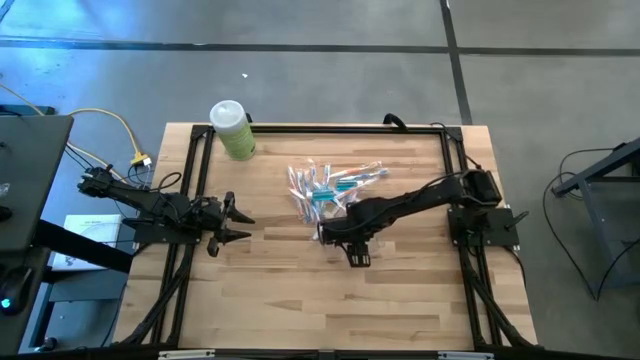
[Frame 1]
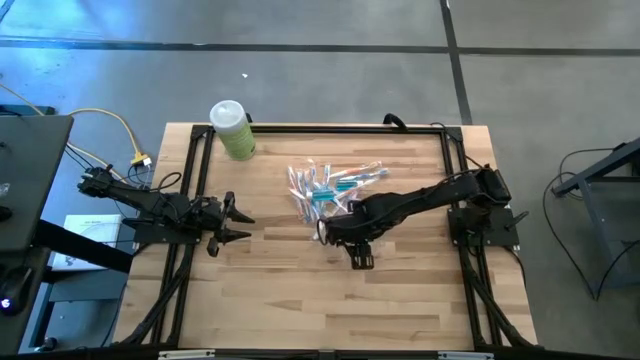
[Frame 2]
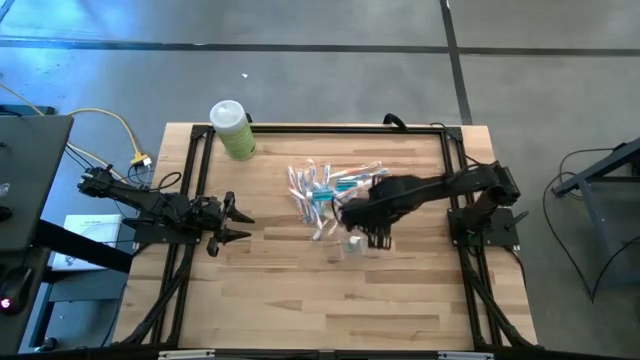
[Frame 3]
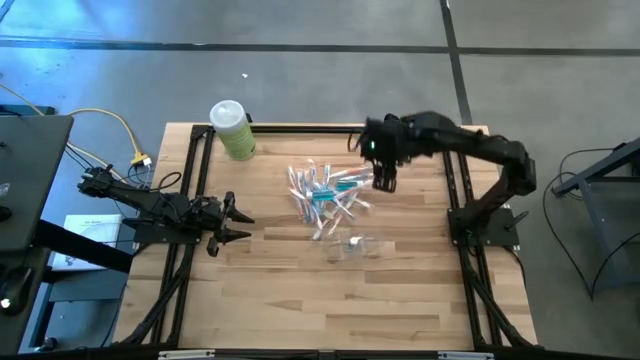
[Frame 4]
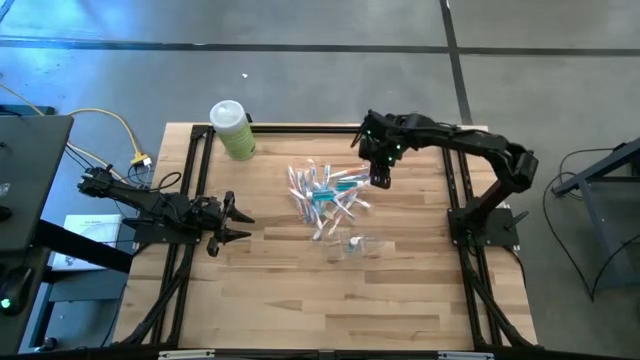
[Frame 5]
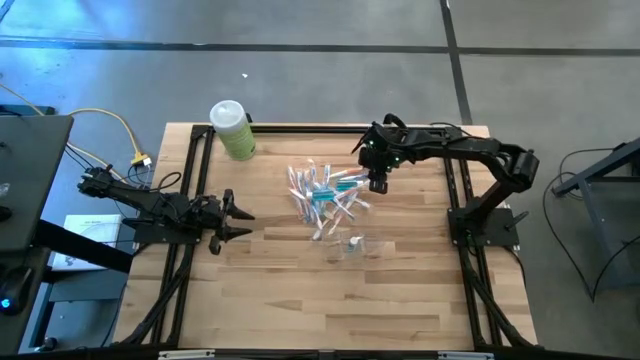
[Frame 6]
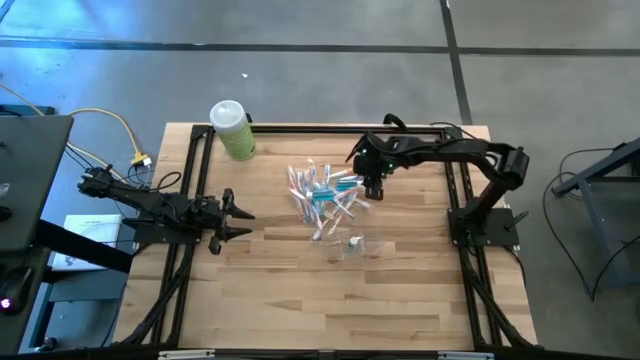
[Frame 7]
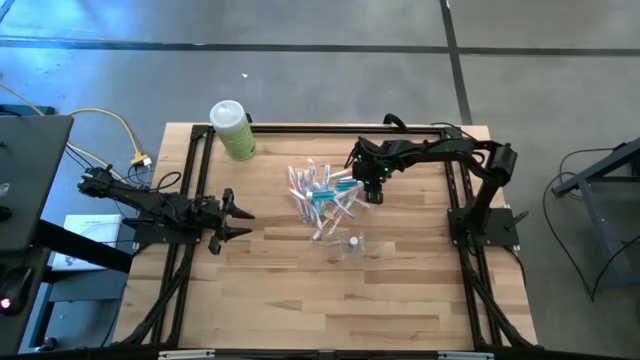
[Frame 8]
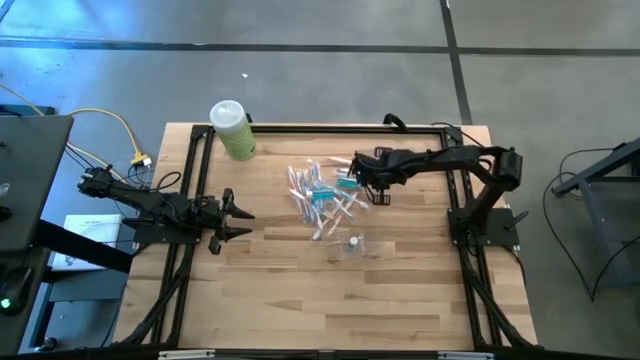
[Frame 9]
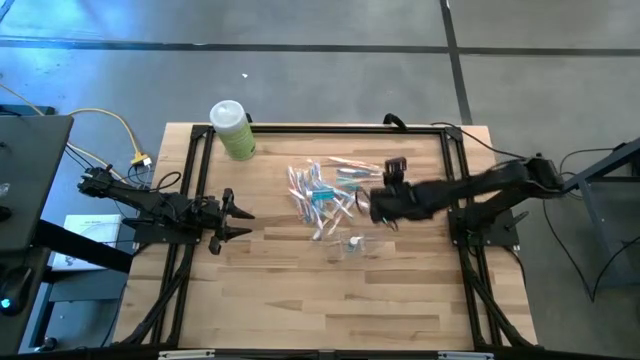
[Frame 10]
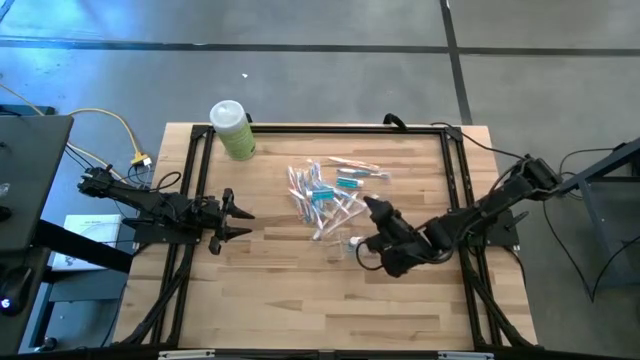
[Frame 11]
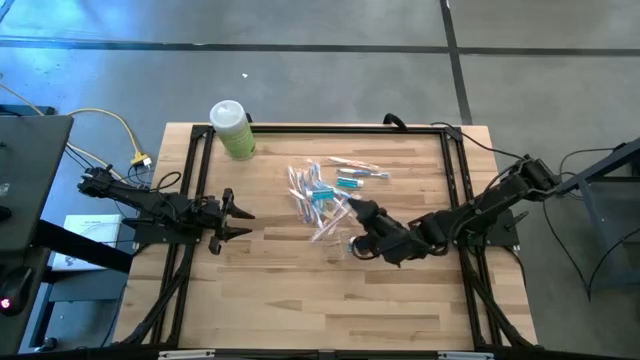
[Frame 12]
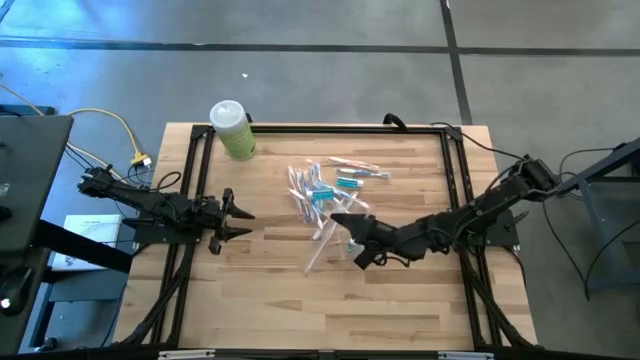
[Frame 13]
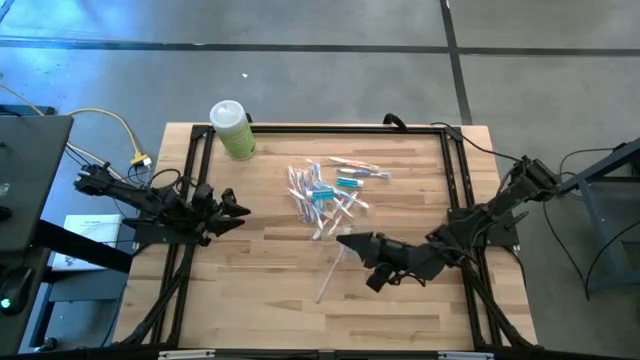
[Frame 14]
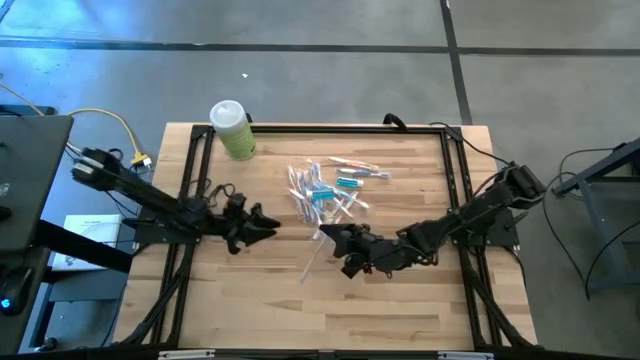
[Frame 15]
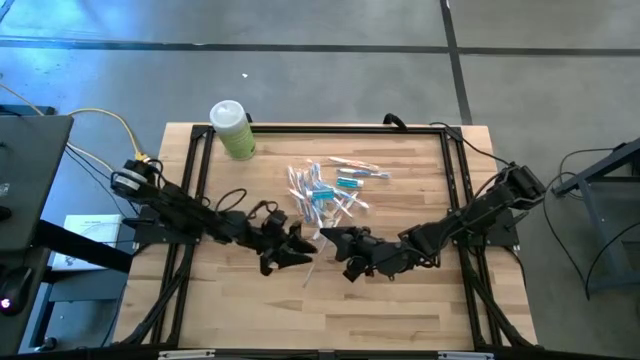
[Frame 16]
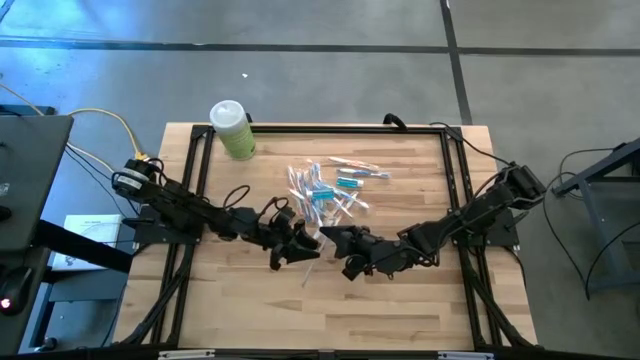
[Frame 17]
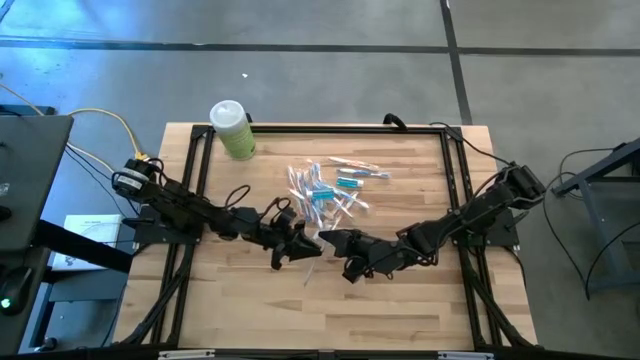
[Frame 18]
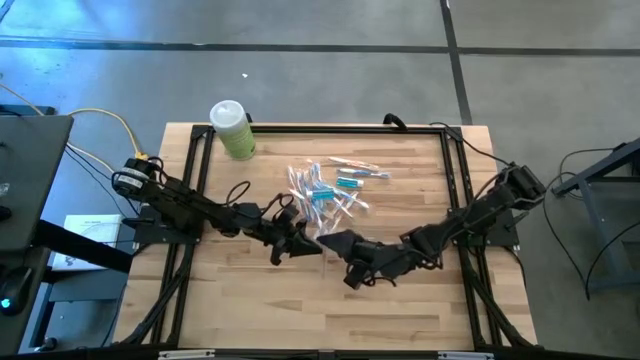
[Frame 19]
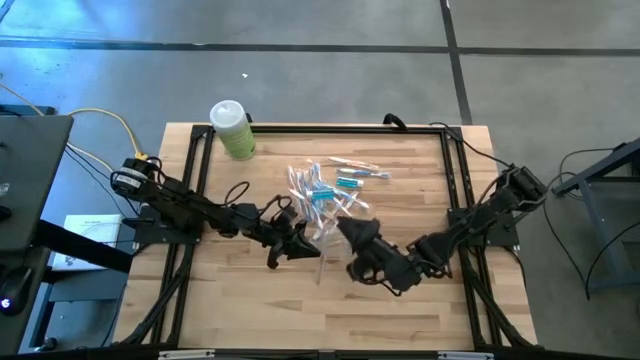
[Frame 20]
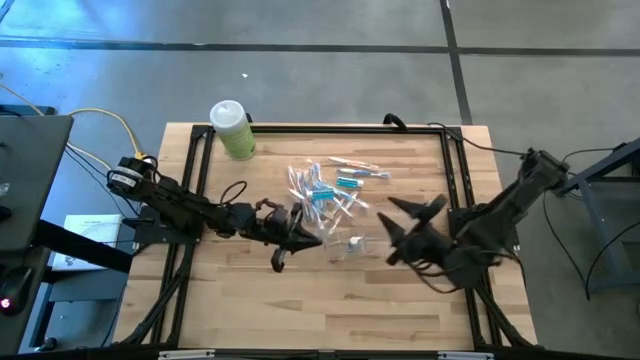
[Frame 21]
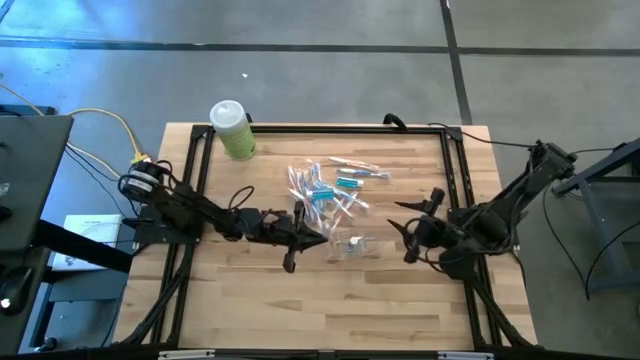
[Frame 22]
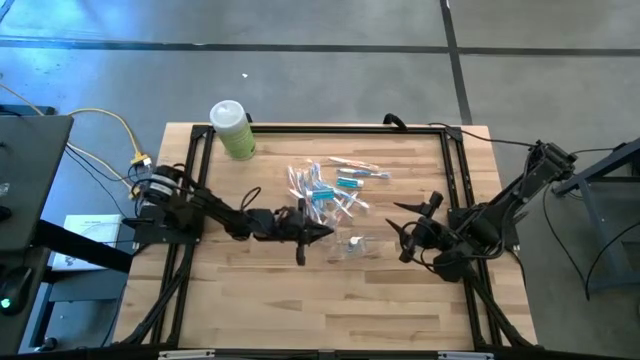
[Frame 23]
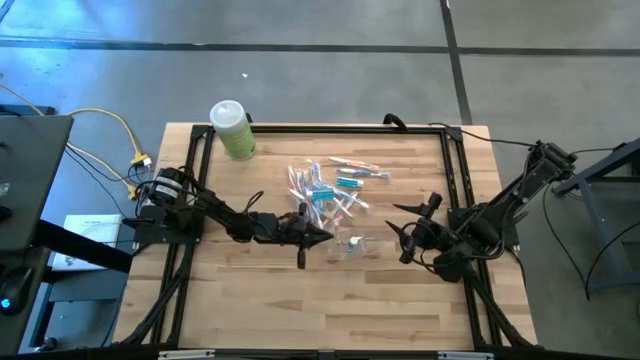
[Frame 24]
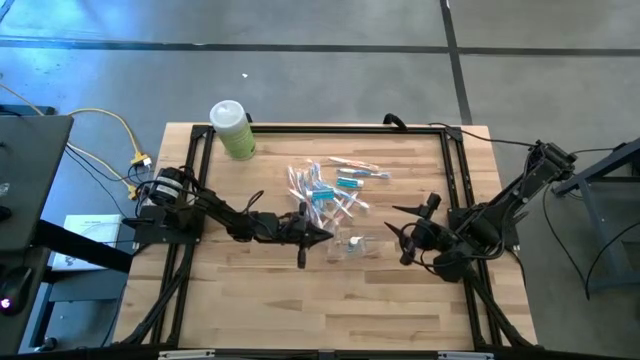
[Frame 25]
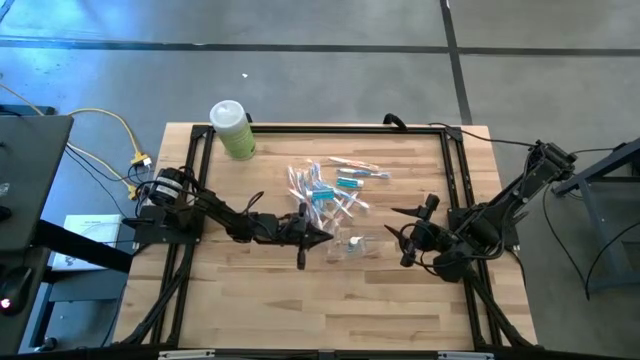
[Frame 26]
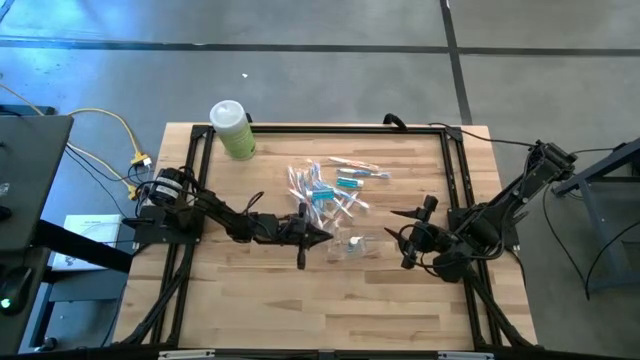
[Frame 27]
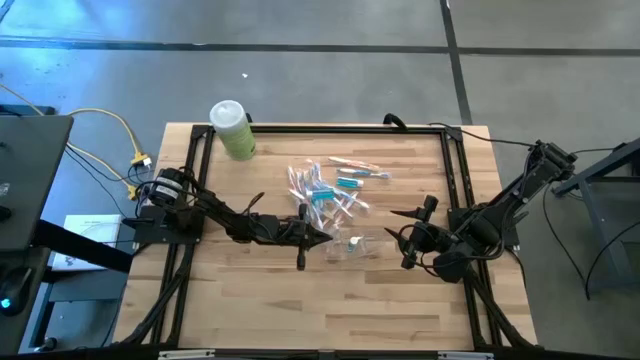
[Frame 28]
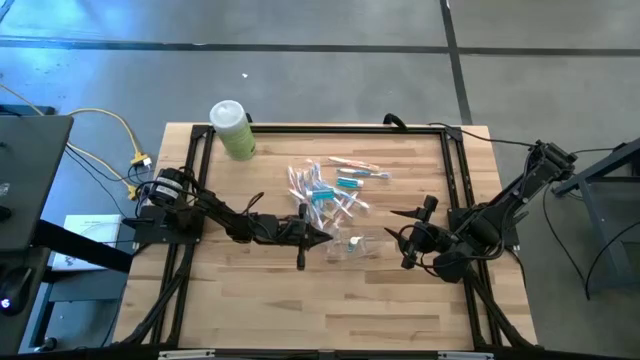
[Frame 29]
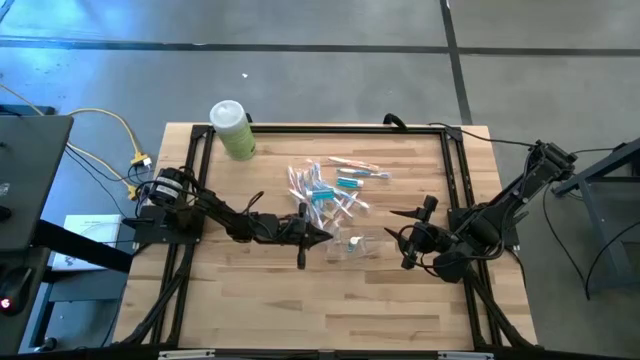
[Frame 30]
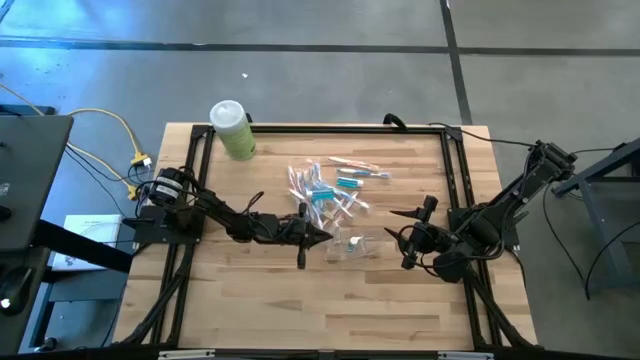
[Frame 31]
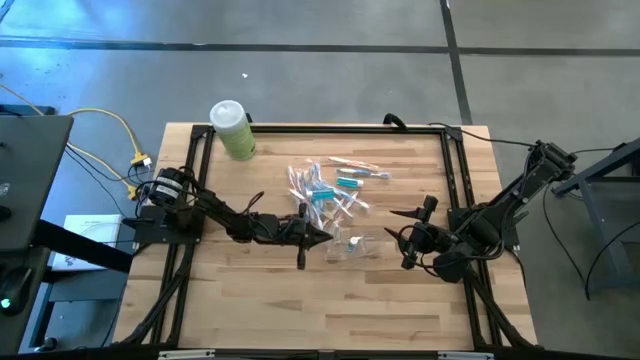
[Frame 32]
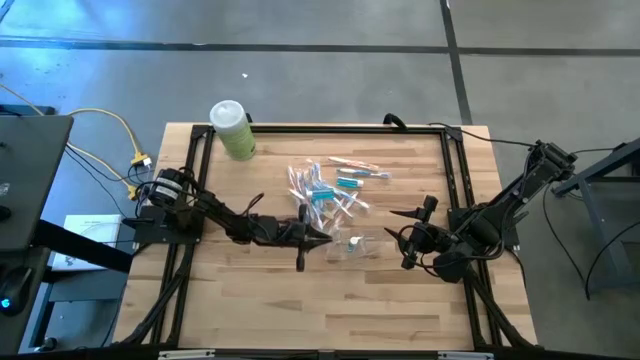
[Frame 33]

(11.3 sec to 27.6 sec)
Task: Pick & Place toothbrushing station
Put the orange toothbrush into the transparent organizer

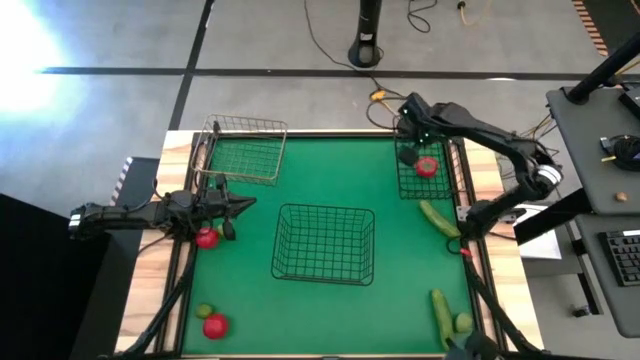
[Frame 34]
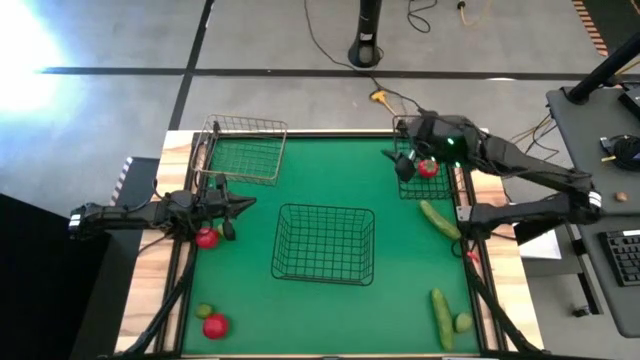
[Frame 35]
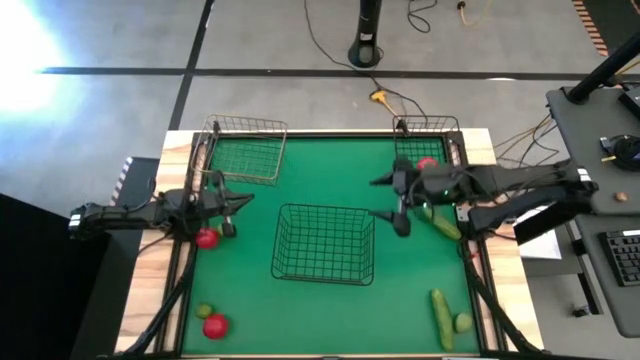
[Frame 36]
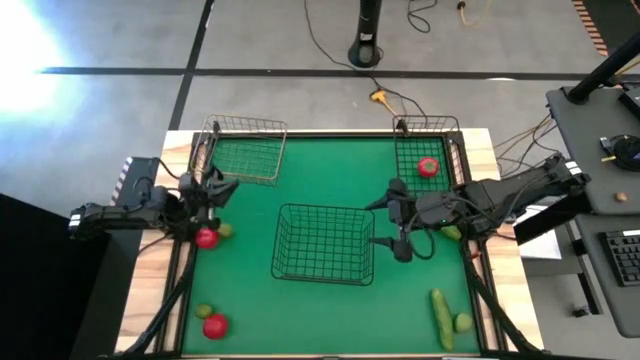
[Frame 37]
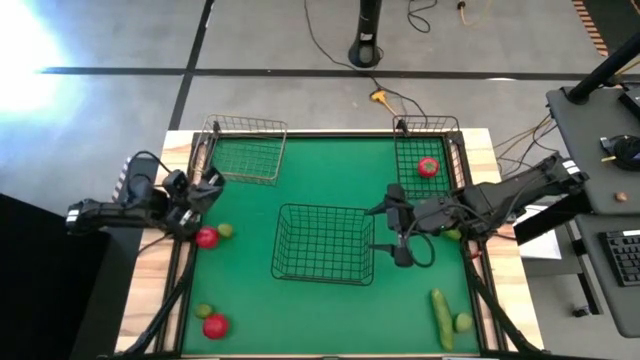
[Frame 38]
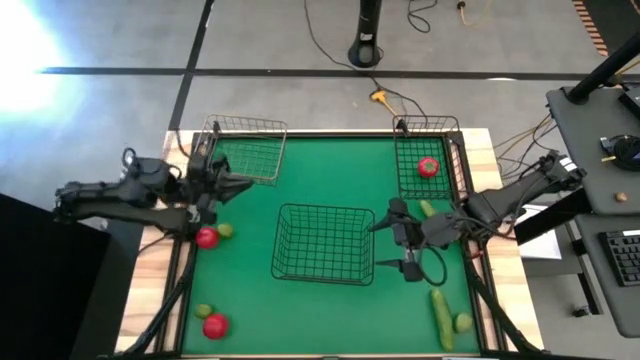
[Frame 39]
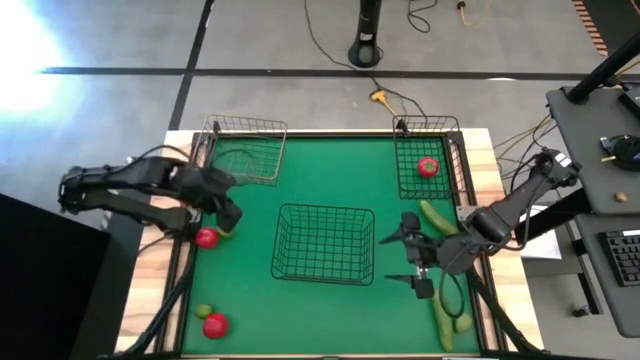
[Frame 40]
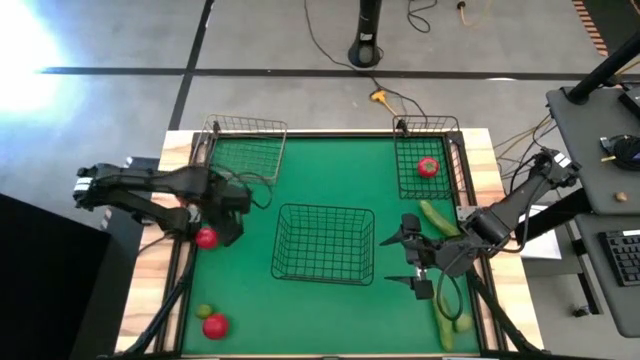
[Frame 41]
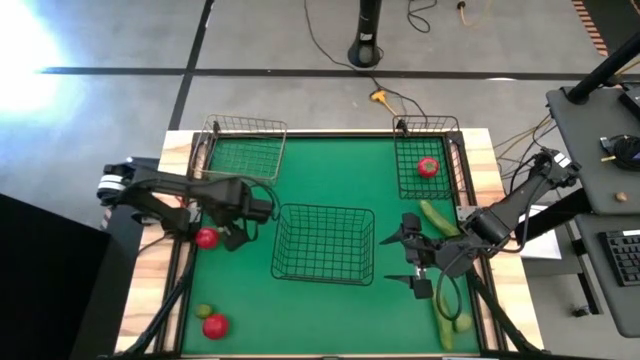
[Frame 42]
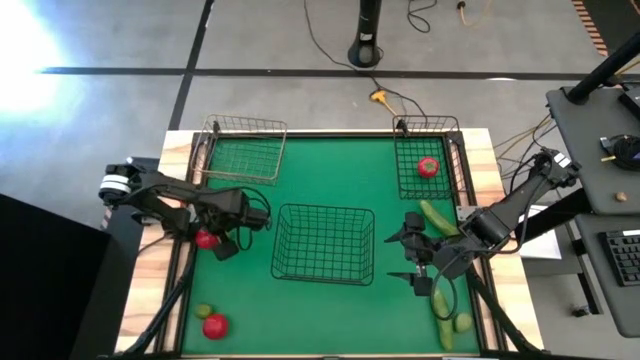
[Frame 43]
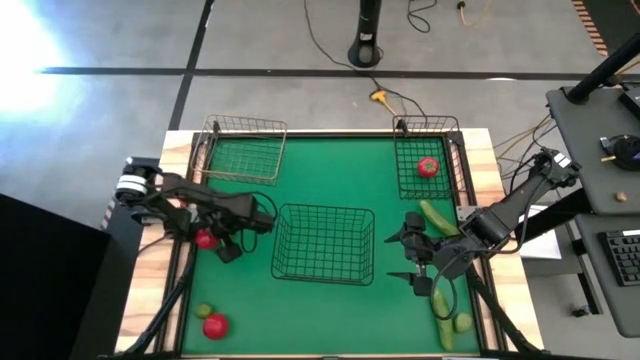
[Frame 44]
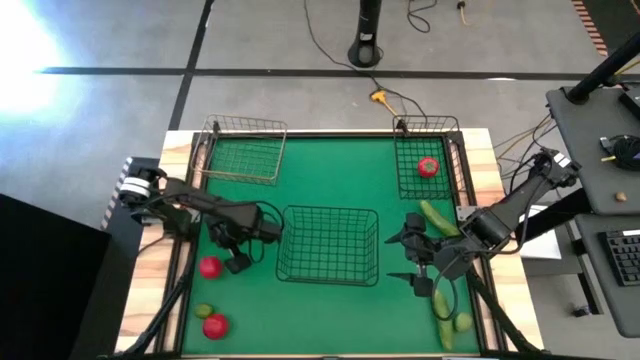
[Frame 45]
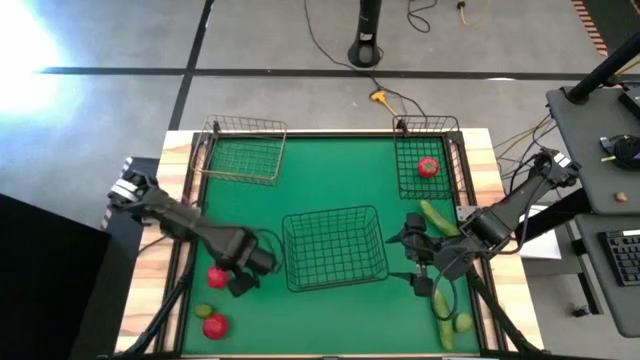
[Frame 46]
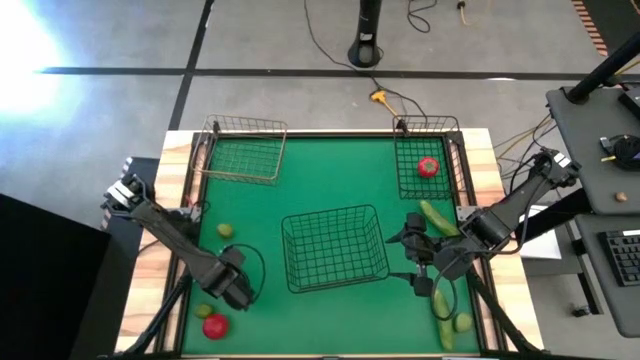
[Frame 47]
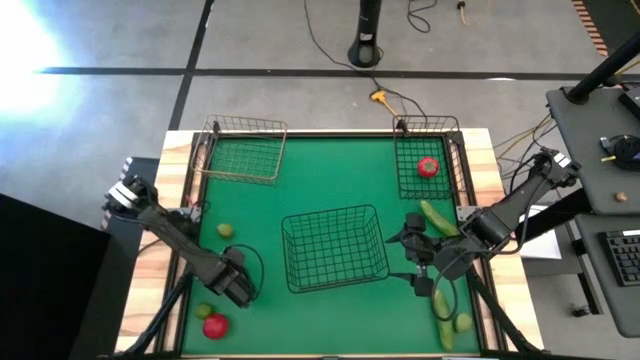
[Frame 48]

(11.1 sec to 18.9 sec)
Task: Sort produce into baskets
Put the top tomato into the top black wire basket
